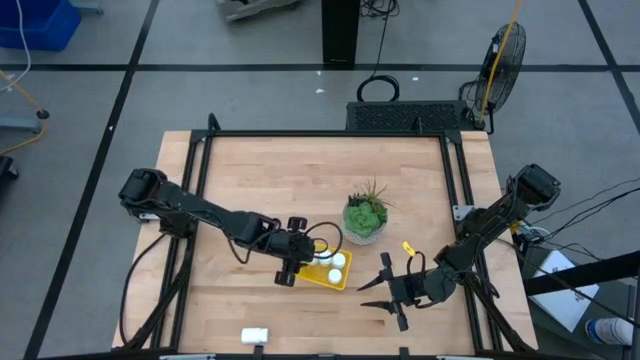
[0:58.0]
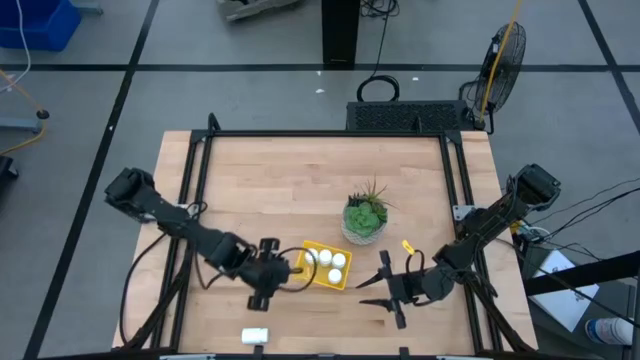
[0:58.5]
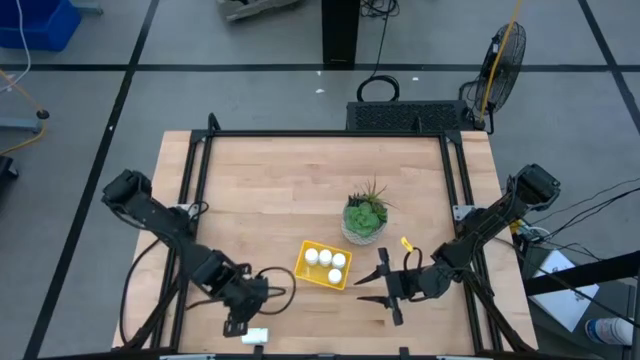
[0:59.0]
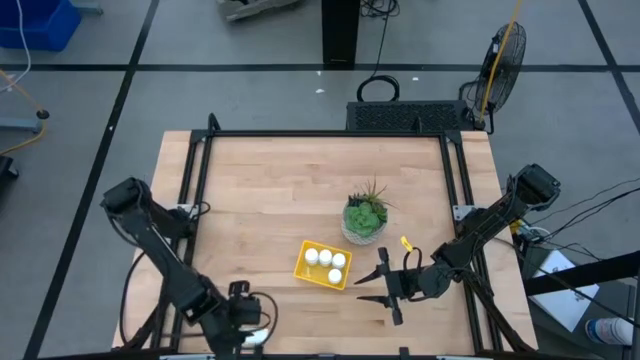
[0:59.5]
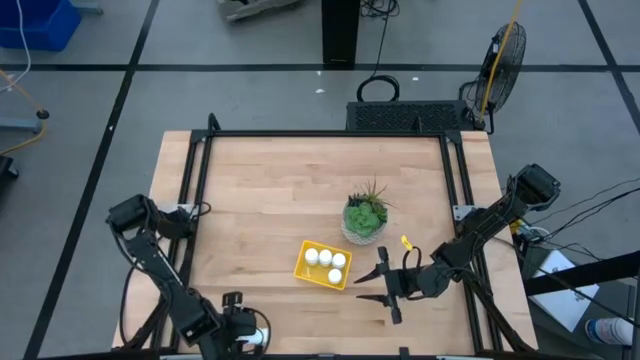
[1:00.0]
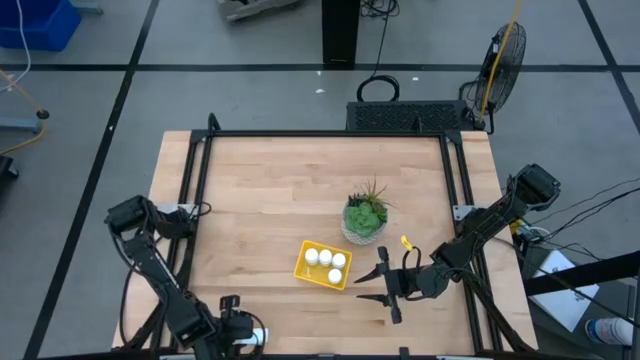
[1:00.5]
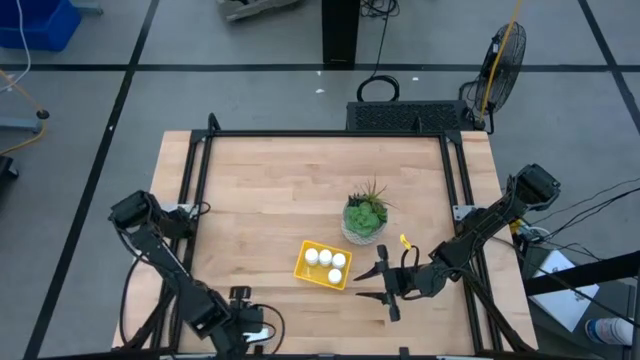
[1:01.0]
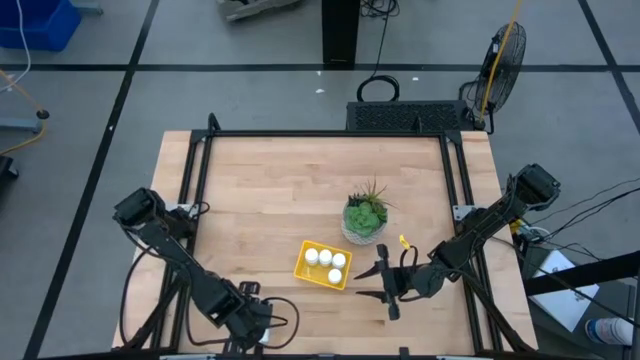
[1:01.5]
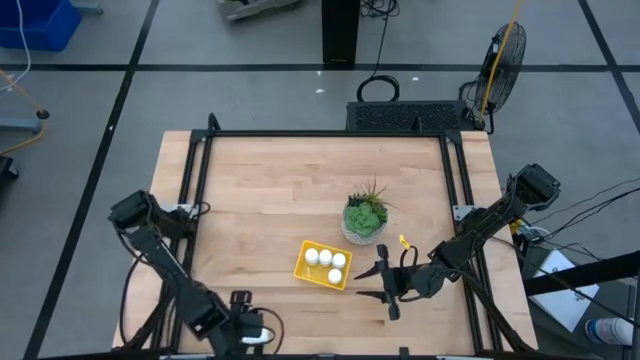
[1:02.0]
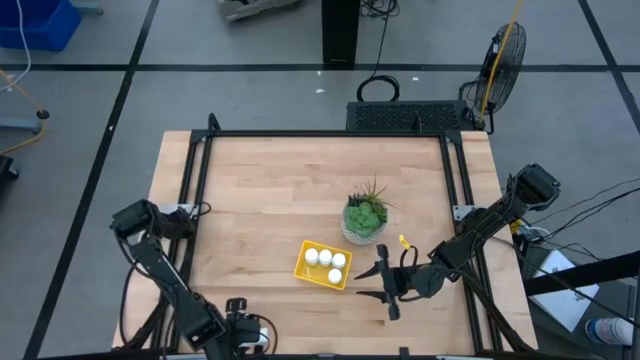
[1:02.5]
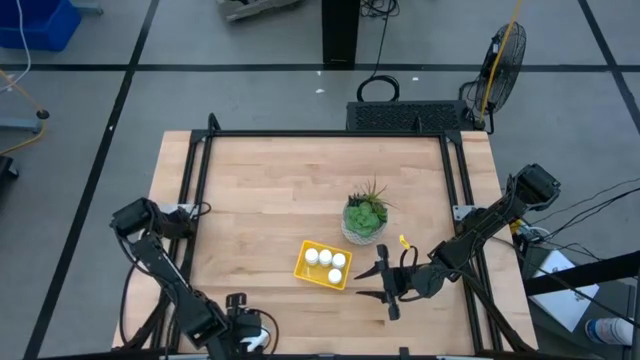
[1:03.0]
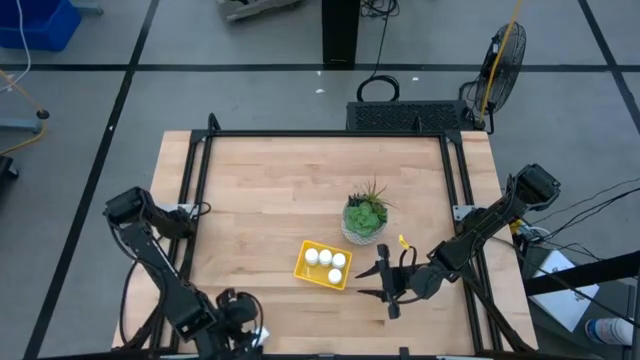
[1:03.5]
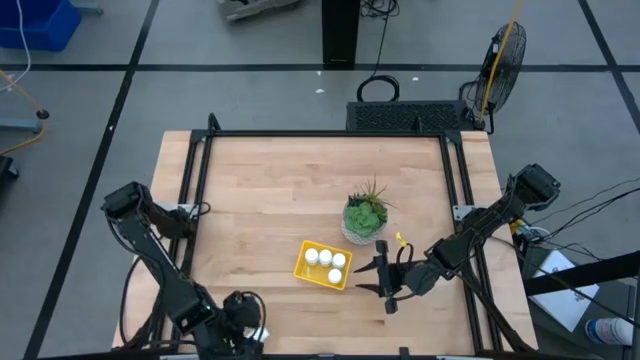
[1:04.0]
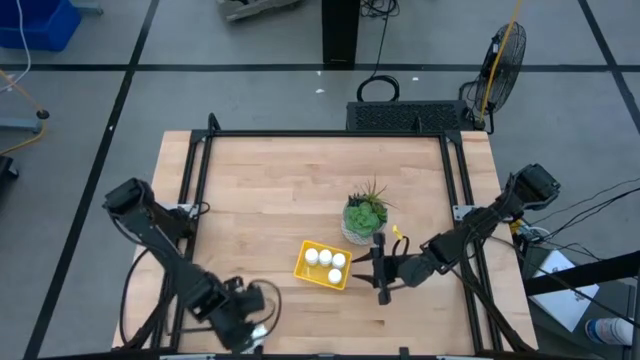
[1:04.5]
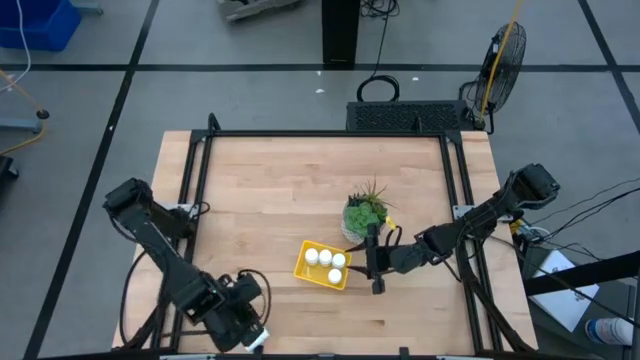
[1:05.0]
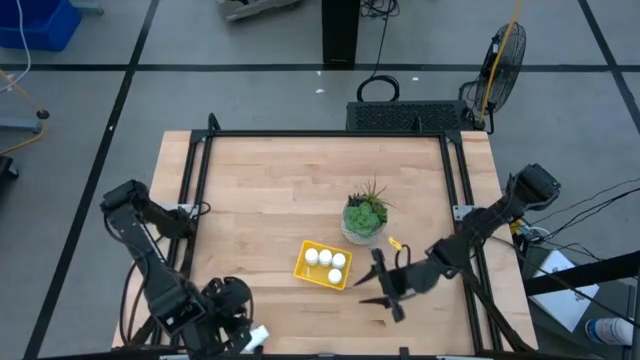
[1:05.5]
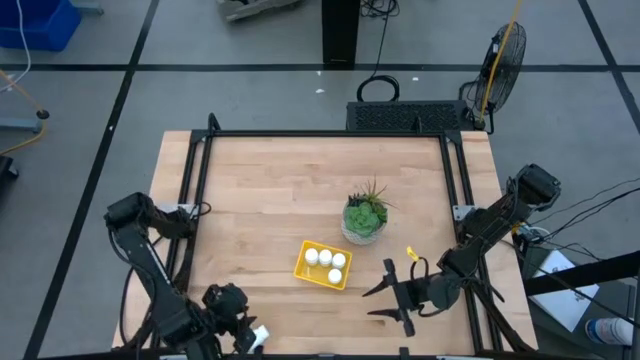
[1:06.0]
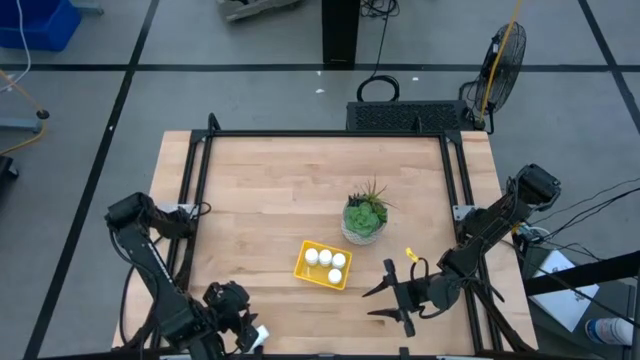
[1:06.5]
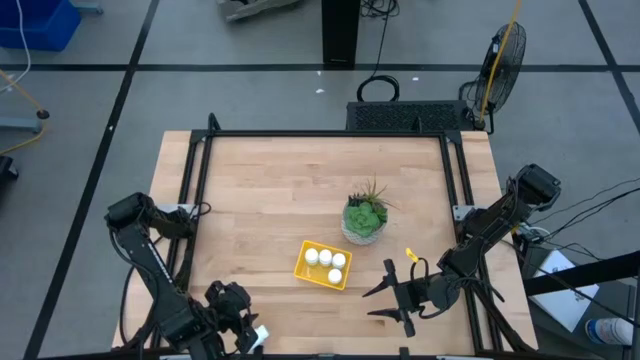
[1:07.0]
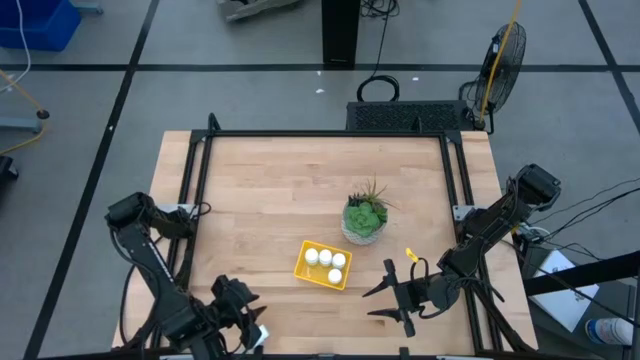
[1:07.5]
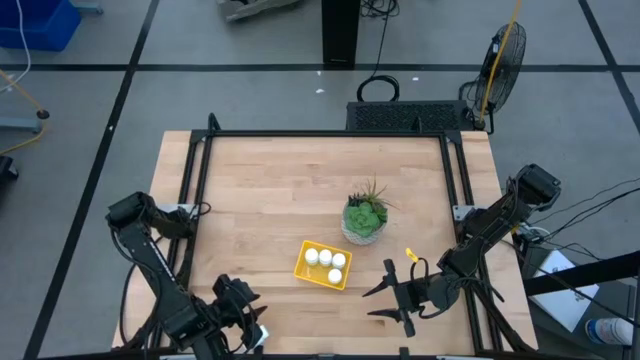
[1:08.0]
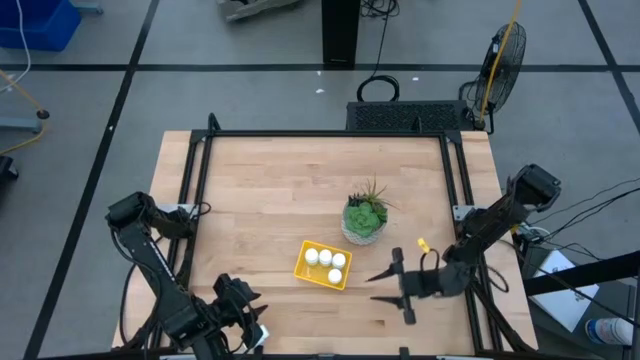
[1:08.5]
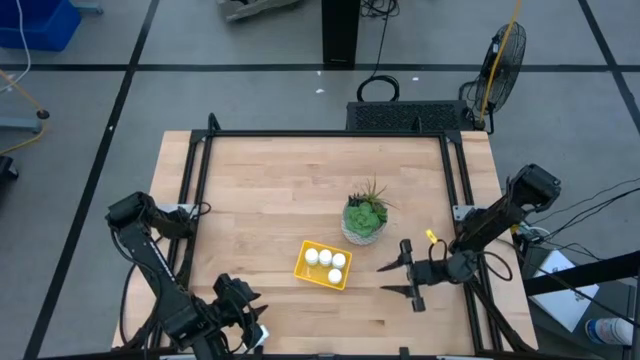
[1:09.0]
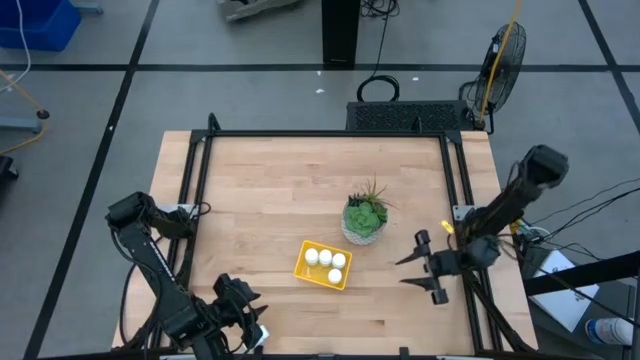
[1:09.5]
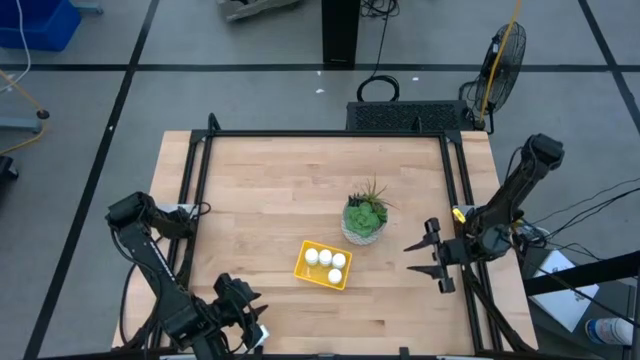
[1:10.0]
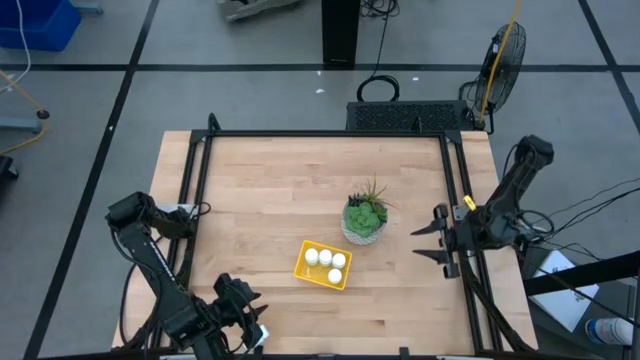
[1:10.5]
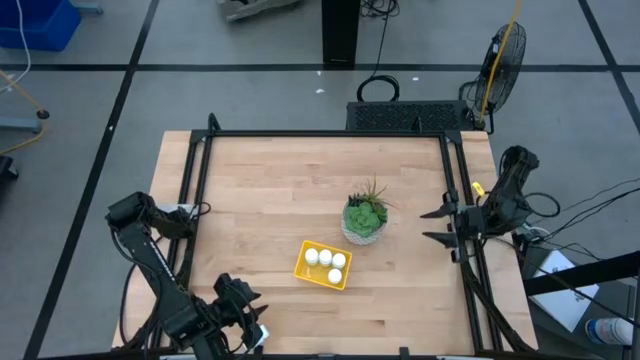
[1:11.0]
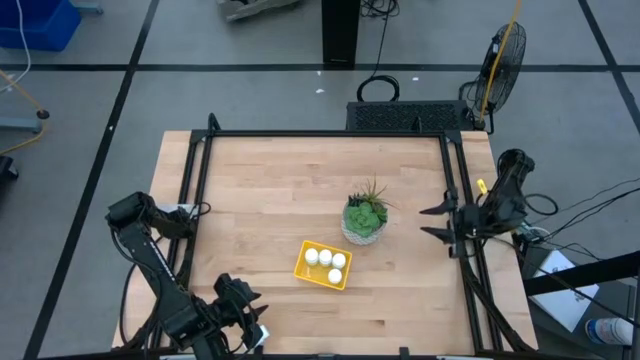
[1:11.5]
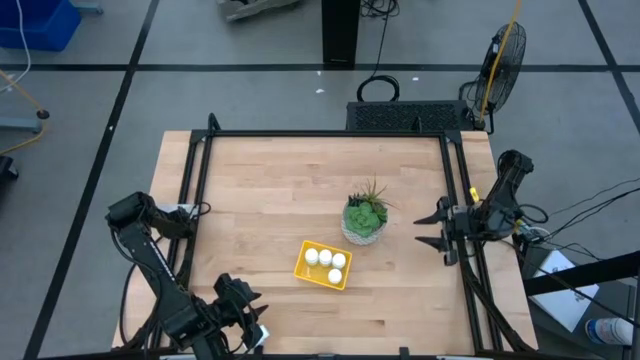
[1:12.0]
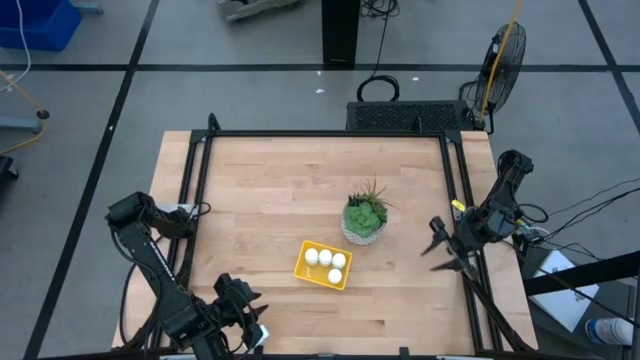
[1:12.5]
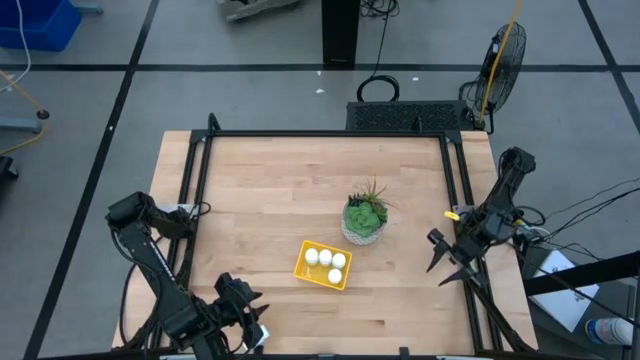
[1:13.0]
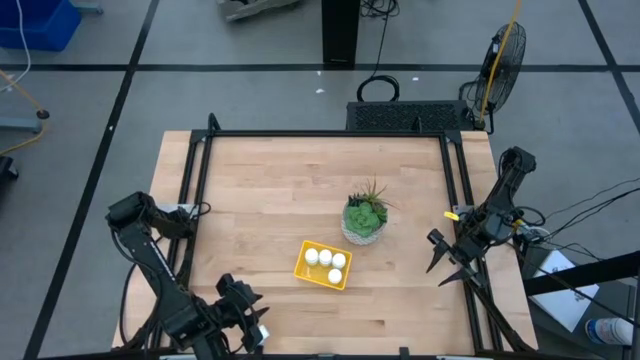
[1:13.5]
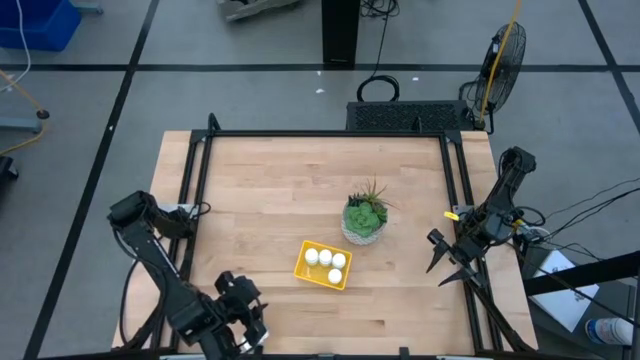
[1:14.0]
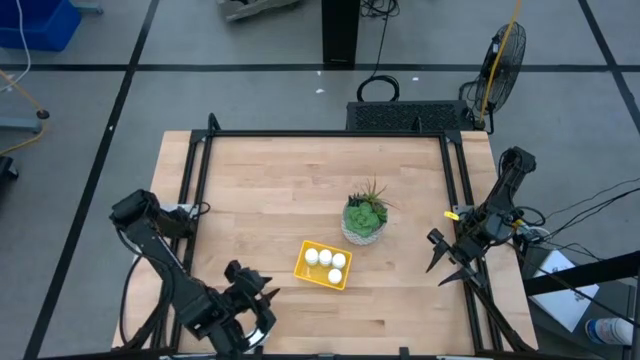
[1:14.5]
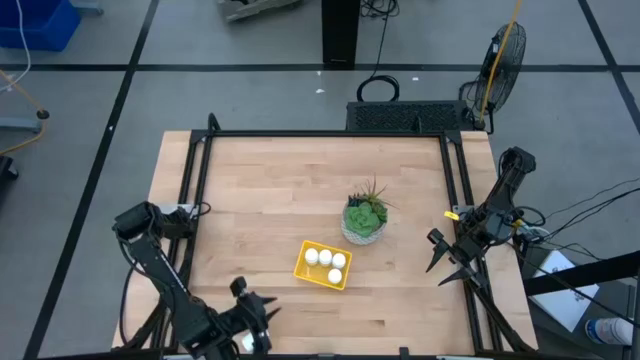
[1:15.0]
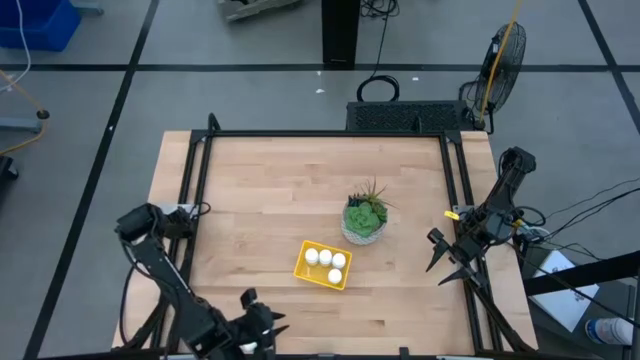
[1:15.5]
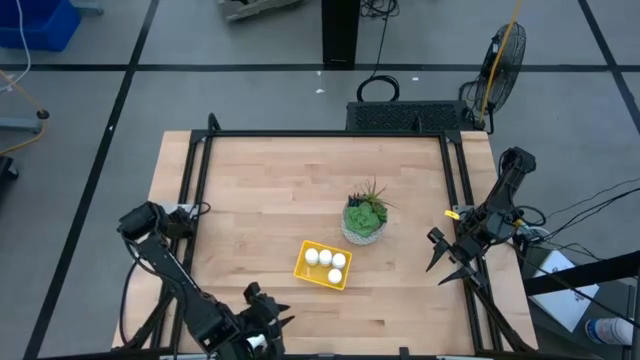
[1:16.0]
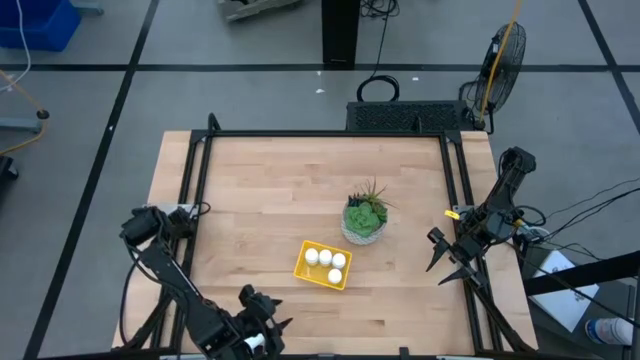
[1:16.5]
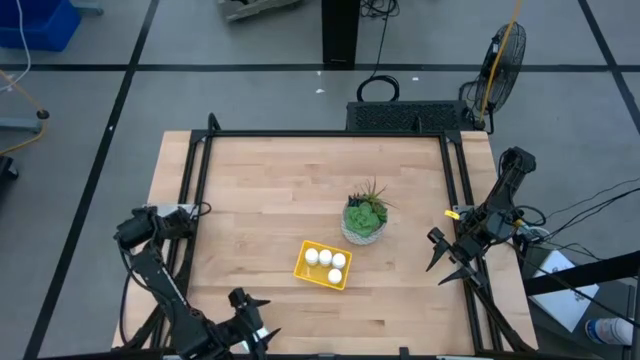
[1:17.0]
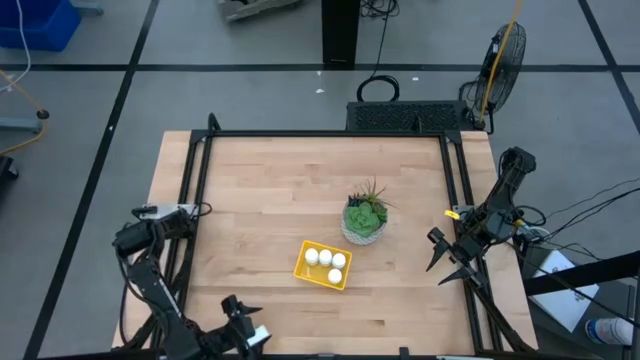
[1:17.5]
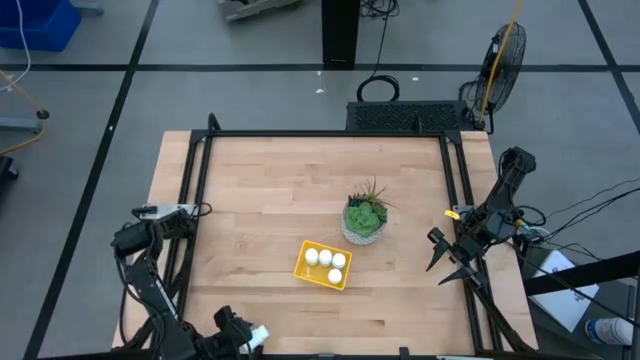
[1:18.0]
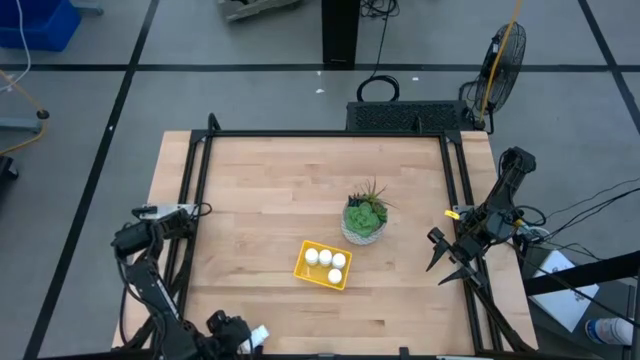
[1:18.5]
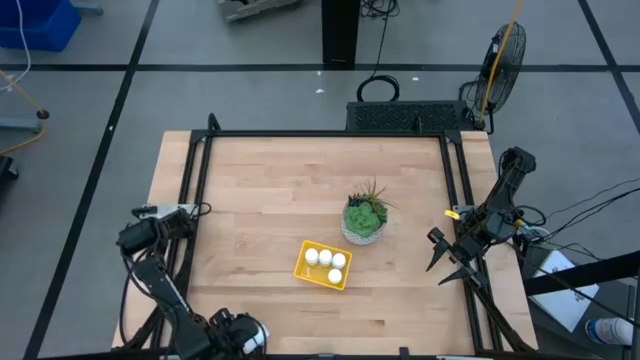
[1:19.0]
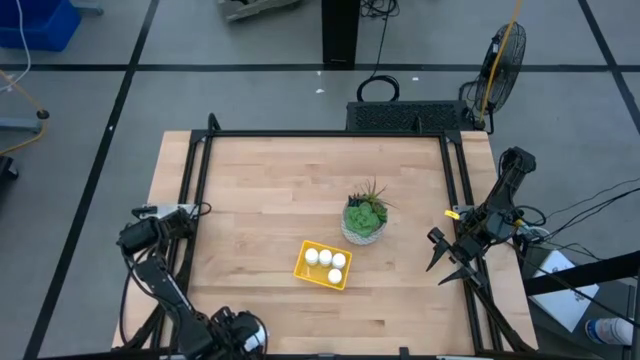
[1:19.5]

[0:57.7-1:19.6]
Task: Pick and place pill bottles into a basket
Put the white pill bottle into the yellow bin
